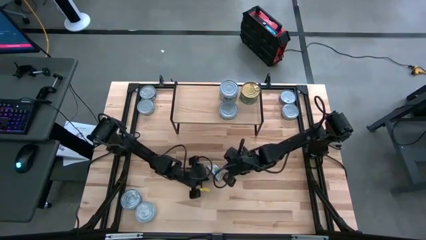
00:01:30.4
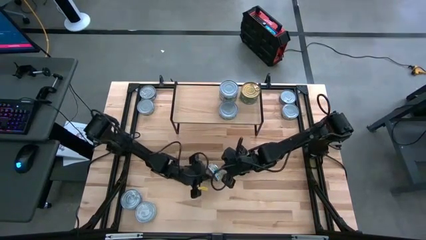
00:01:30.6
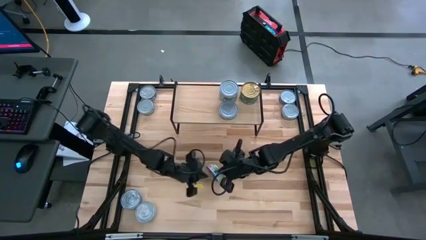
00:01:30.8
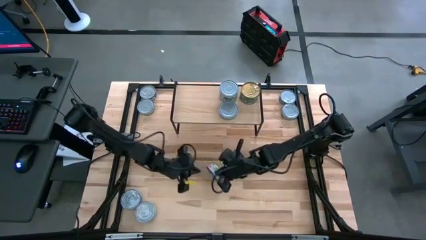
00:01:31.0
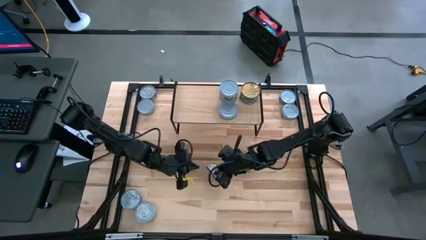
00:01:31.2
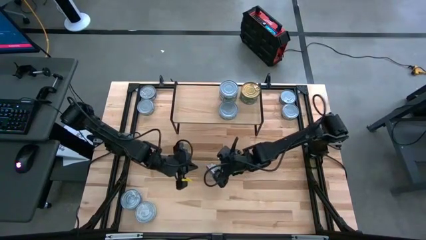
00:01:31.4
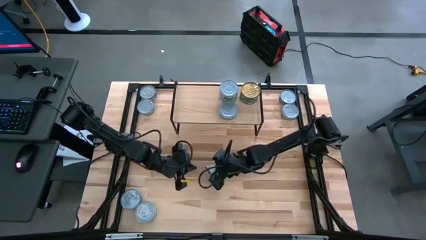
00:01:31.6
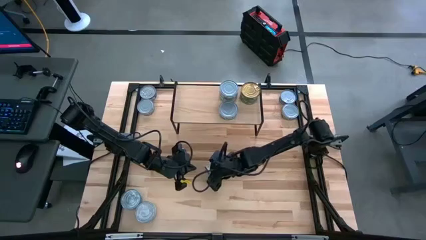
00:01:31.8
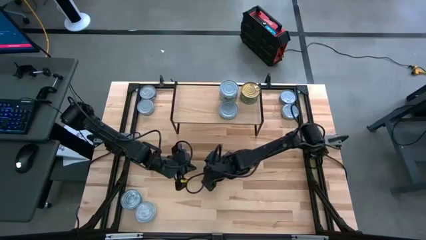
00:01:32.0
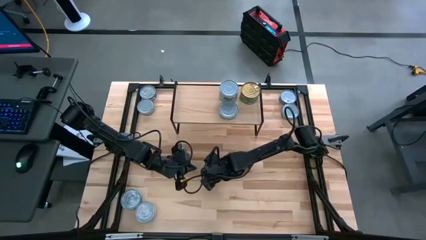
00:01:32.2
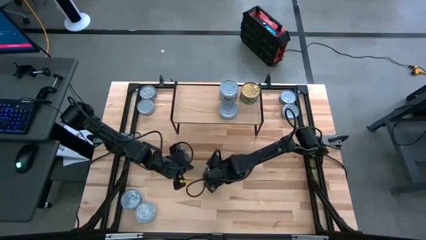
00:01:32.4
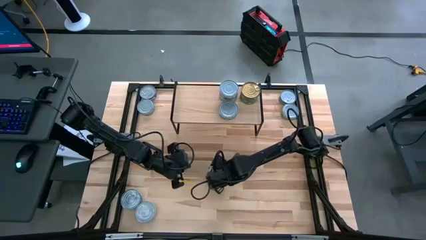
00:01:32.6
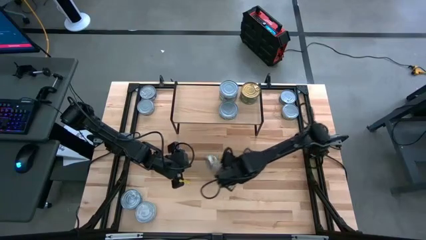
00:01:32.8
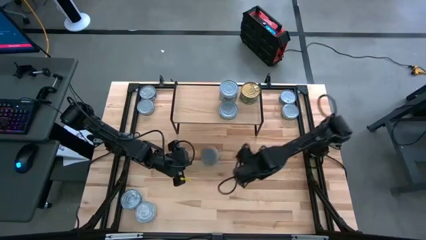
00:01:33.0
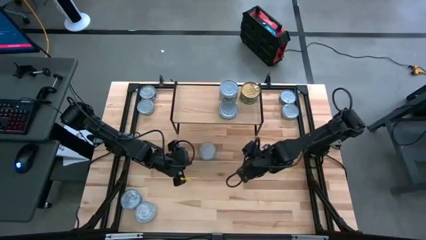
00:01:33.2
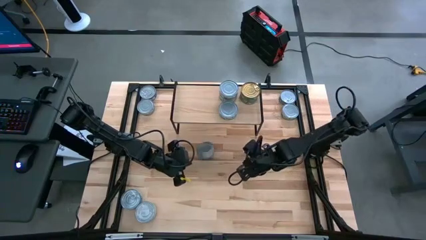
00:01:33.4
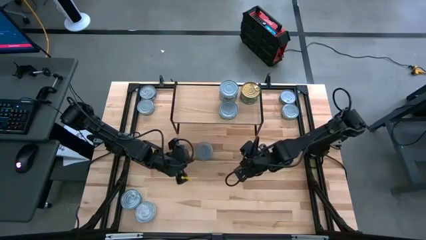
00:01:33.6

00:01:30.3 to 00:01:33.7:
Task: Stack canned seafood by type on shelf
Stack the light green tuna can on top of the other light green tuna can on the shelf

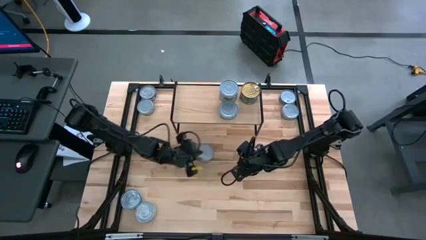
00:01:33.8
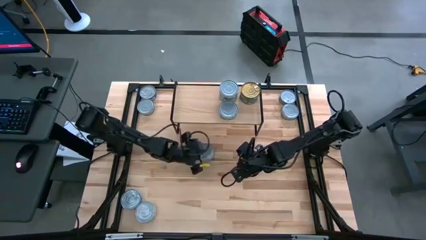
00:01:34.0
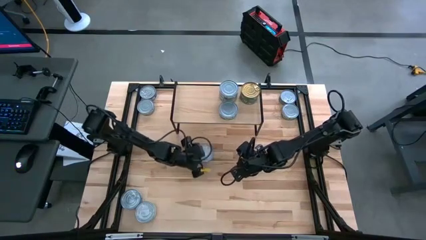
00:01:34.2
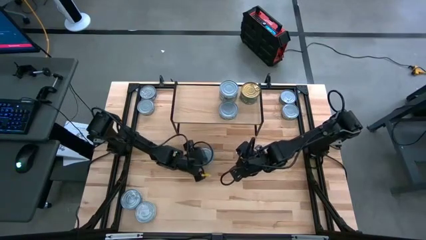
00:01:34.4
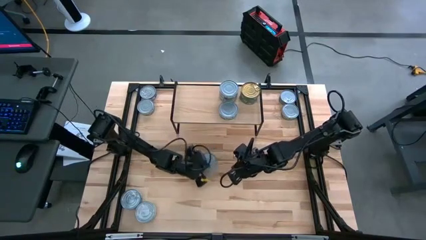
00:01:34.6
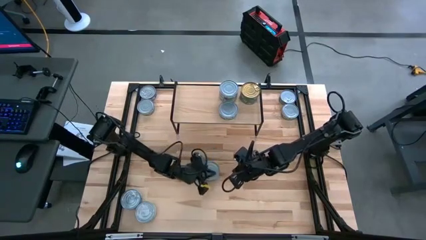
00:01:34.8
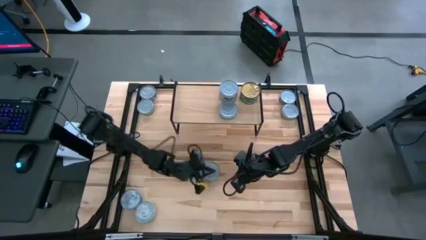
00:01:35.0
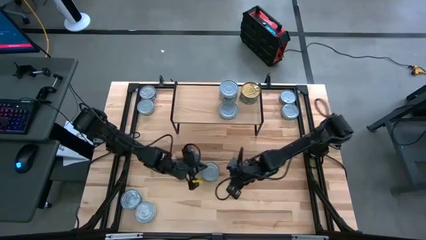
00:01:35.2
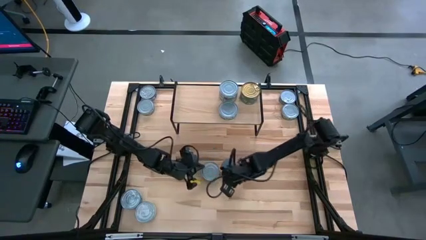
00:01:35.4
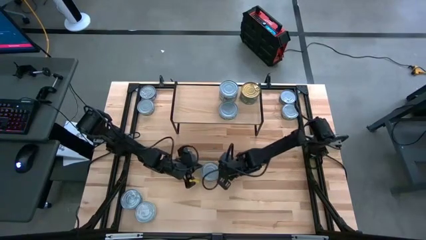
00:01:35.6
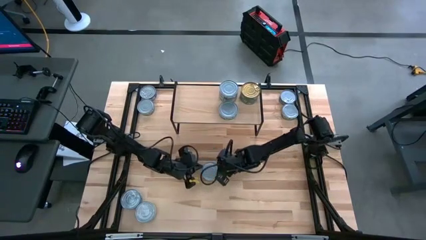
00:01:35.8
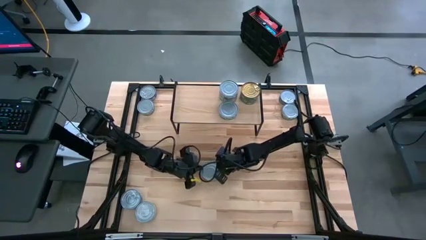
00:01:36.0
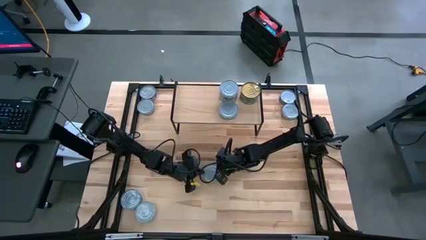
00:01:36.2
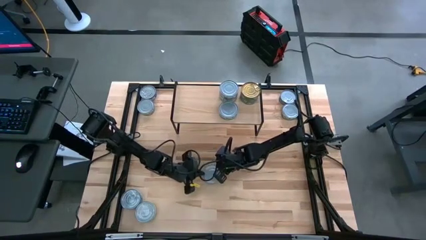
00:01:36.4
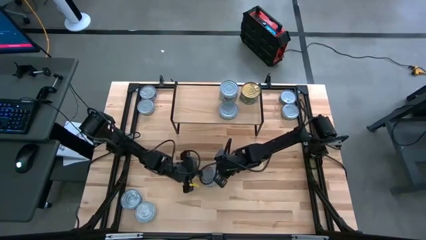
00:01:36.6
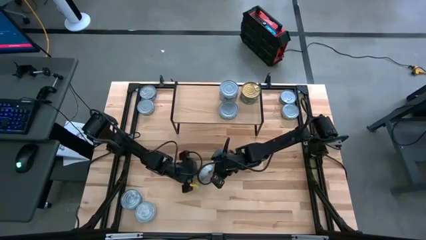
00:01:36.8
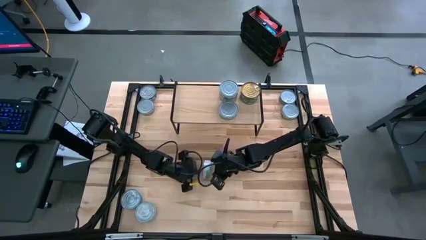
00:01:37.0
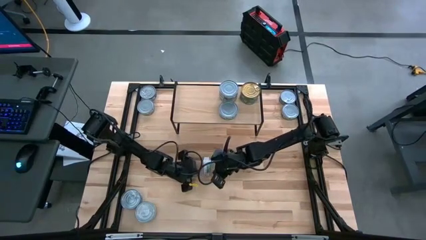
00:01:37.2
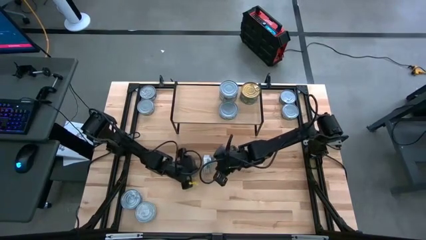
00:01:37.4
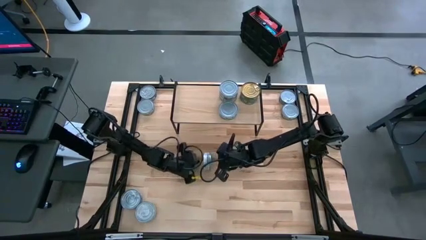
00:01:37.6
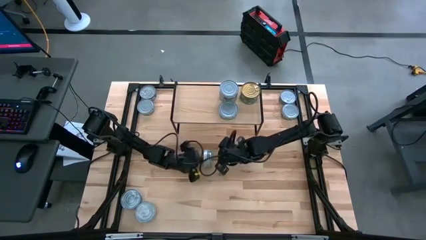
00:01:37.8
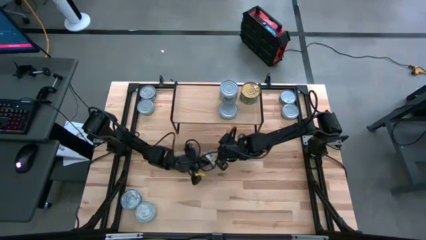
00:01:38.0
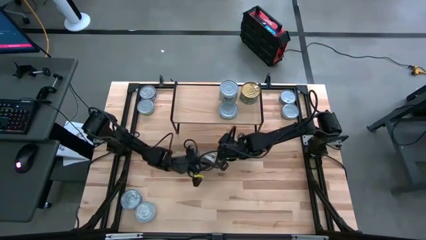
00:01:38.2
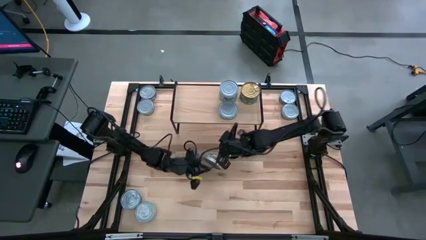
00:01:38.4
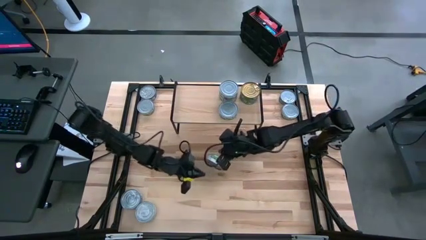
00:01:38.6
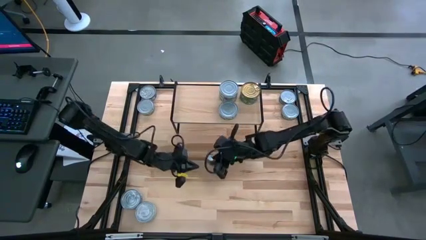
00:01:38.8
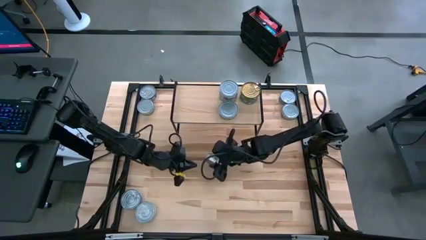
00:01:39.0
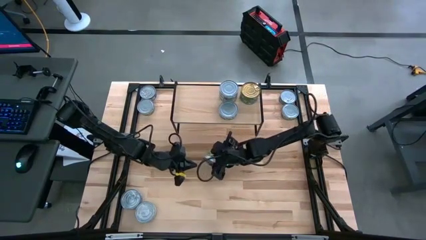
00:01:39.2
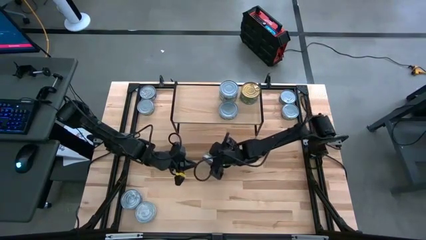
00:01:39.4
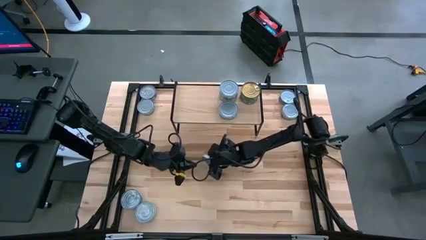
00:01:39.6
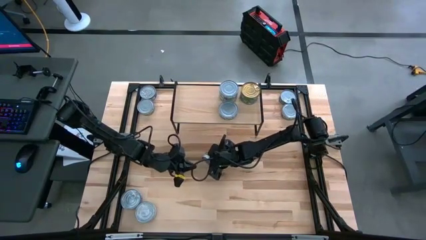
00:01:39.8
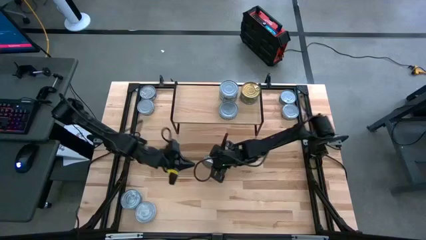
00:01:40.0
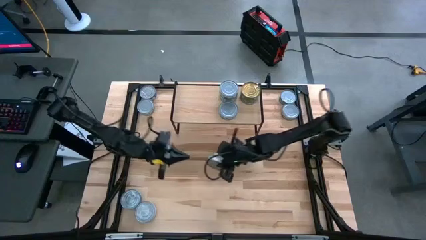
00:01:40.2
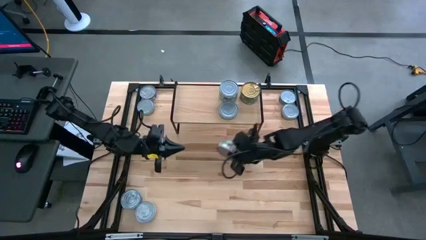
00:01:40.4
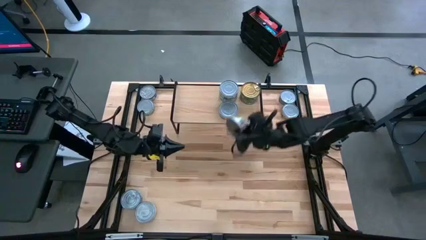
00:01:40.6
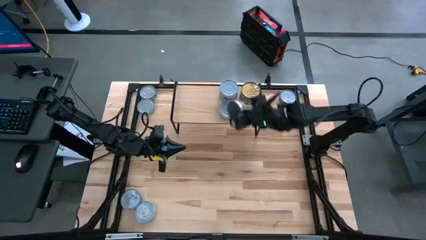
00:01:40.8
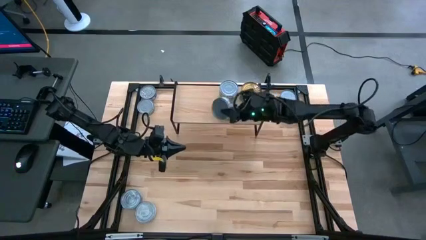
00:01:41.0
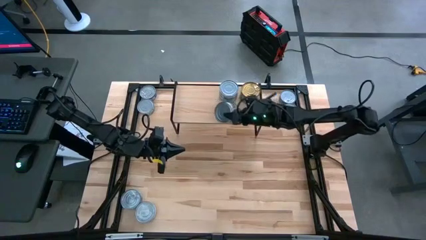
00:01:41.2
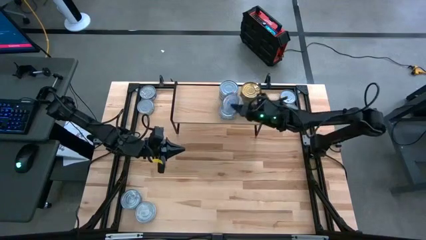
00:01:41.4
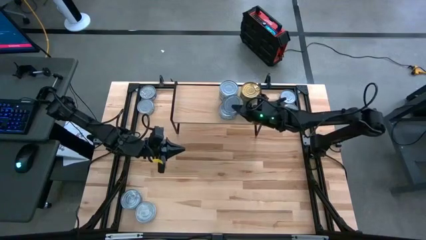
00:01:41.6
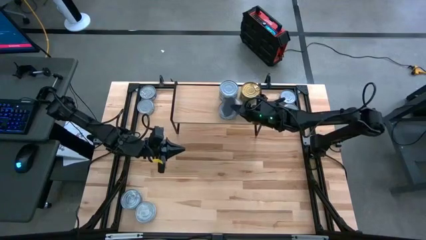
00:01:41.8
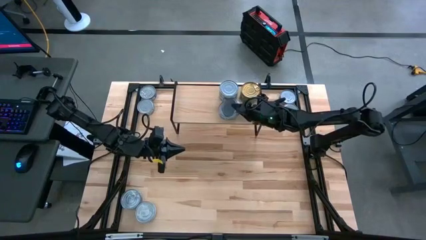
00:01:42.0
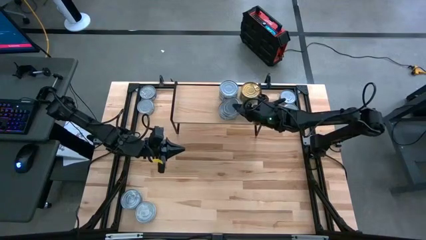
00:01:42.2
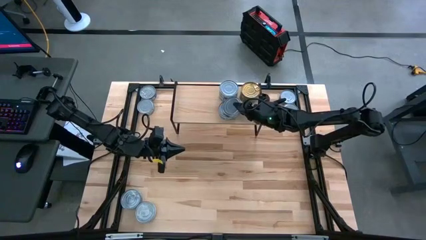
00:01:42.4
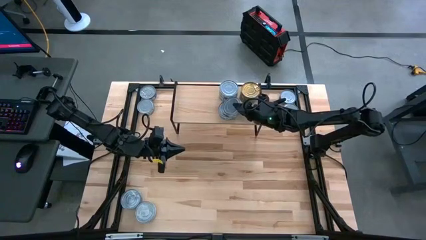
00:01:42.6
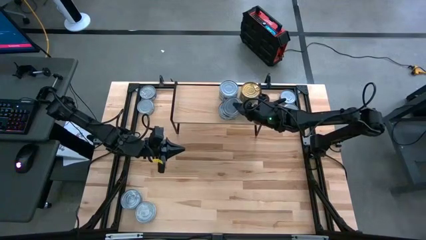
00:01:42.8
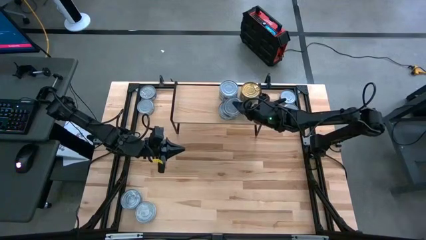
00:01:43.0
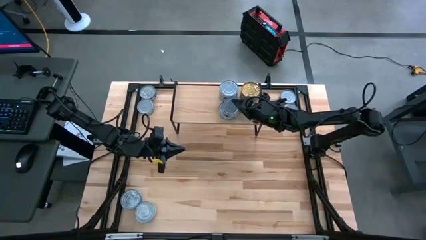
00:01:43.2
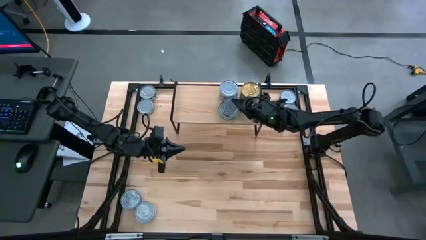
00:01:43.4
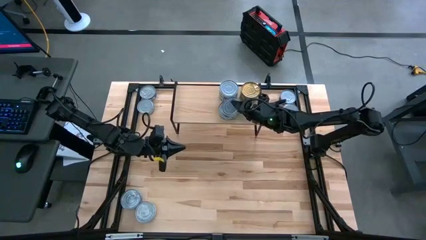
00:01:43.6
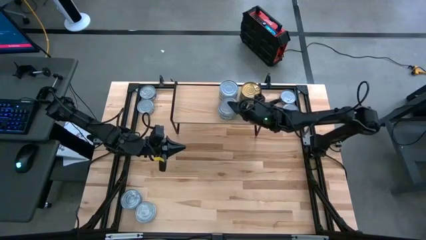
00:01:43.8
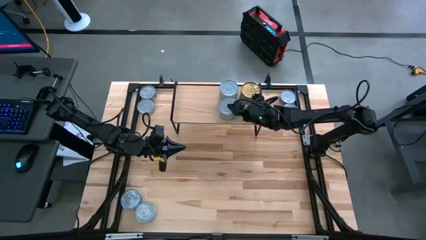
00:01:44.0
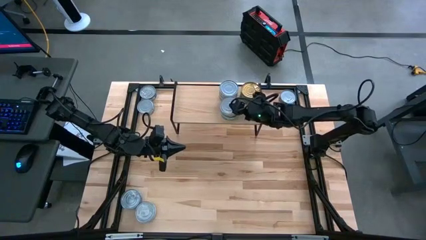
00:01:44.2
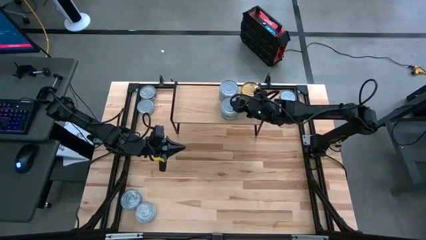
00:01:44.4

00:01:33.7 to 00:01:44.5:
Stack the light green tuna can on top of the other light green tuna can on the shelf

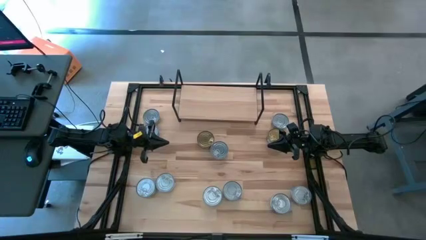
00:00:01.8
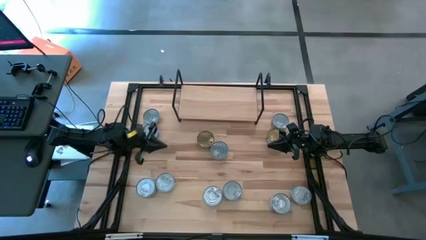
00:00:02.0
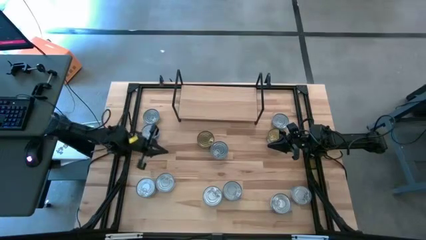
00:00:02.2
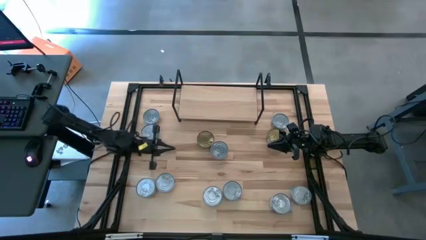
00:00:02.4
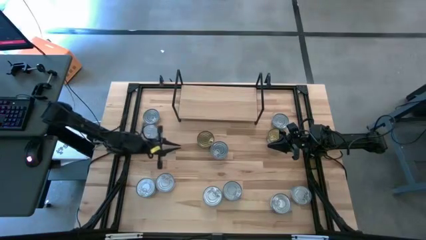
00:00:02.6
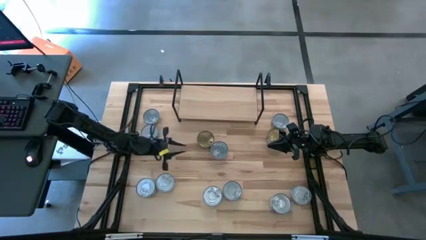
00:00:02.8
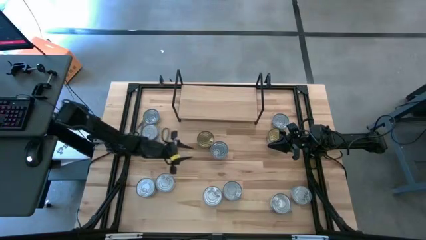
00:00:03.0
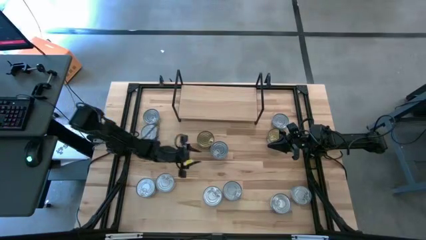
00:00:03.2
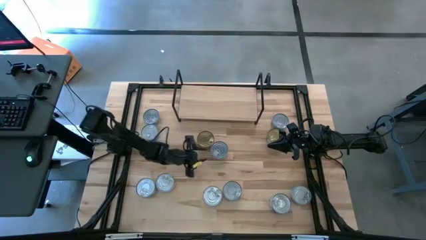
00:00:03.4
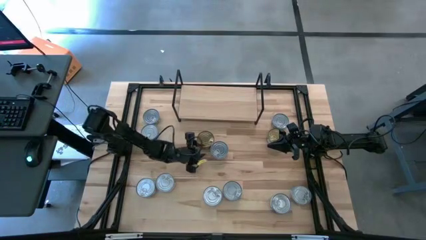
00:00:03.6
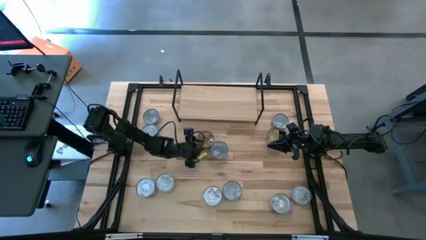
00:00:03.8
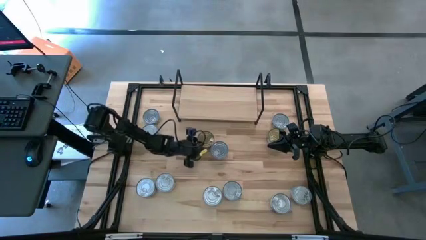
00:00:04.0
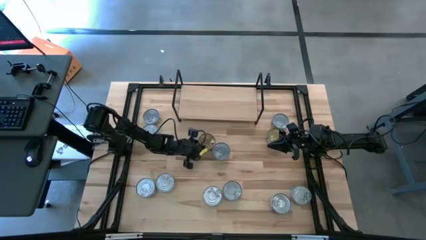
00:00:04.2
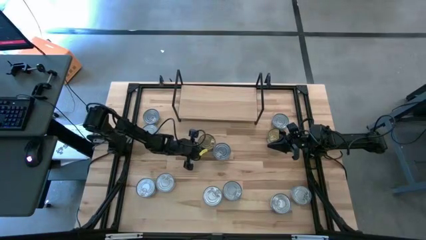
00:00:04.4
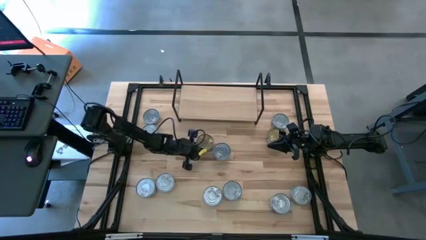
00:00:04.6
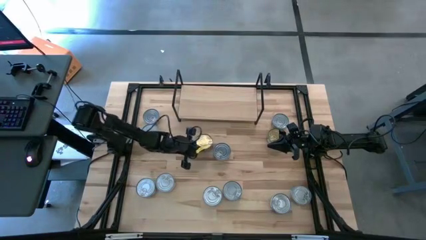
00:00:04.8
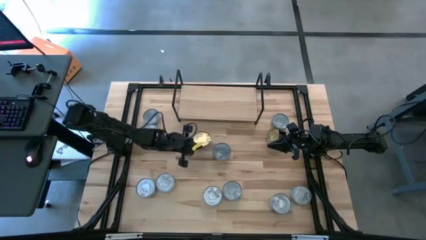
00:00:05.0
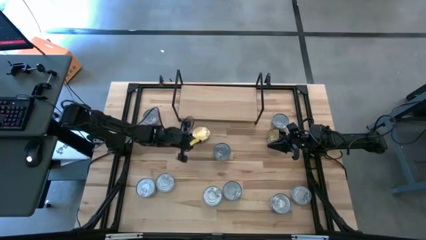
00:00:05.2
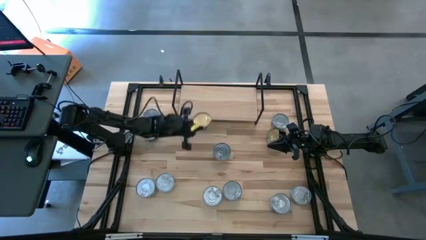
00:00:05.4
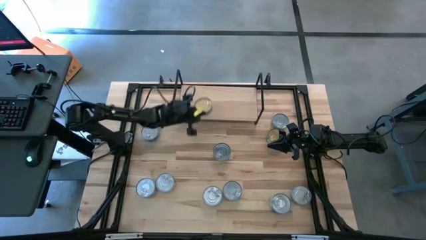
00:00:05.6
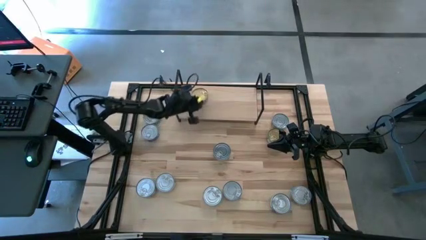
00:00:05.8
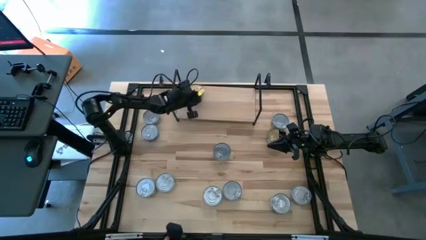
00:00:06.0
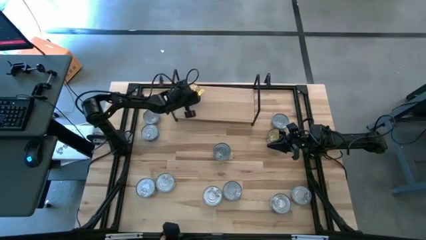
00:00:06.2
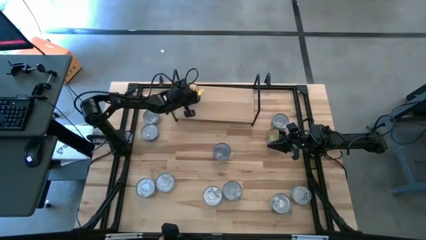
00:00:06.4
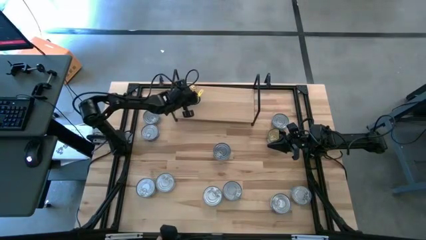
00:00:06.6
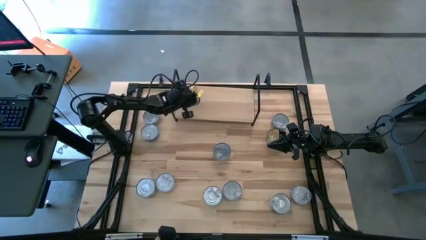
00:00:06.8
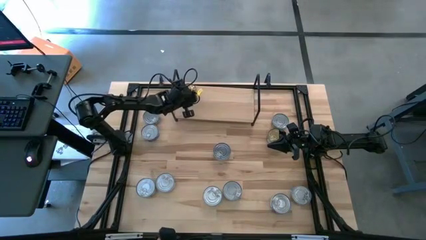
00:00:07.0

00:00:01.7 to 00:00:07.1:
Task: Stack canned seafood by type on shelf
Put the green tuna can on the shelf
